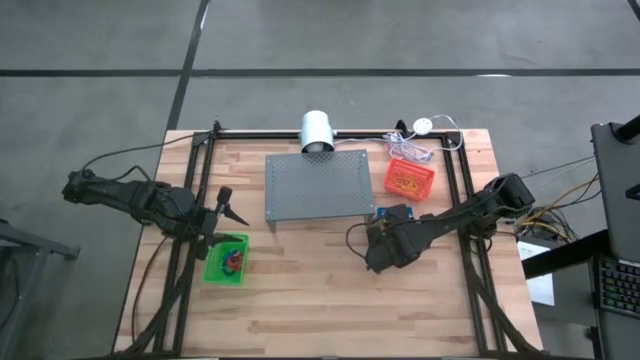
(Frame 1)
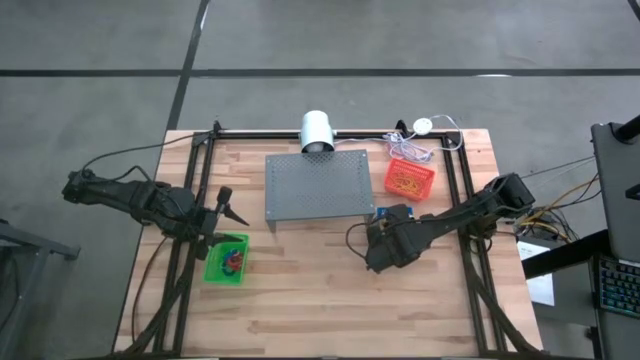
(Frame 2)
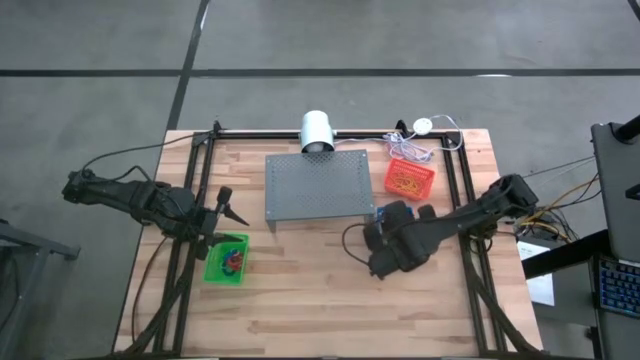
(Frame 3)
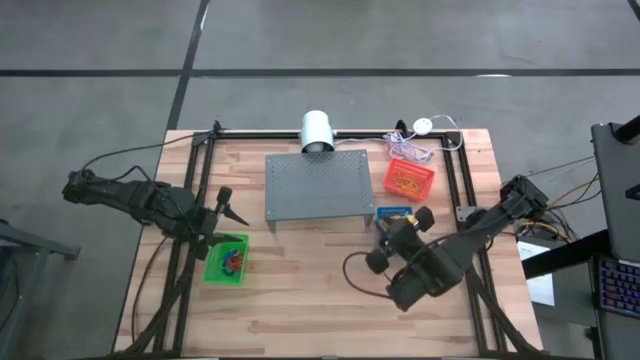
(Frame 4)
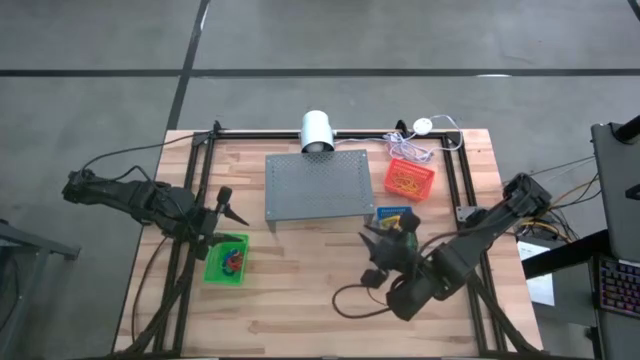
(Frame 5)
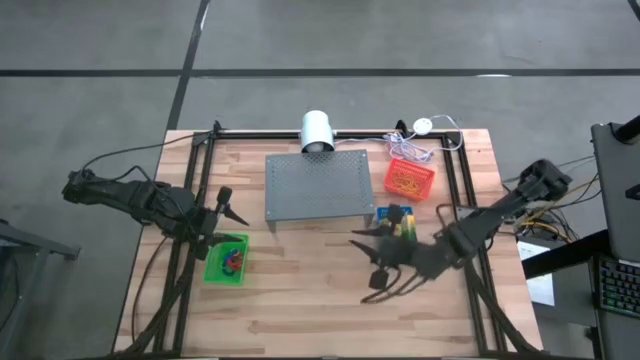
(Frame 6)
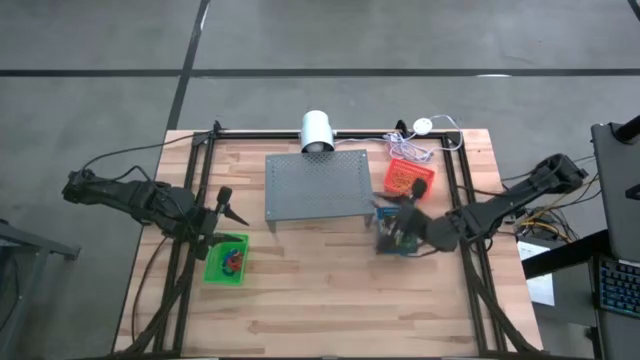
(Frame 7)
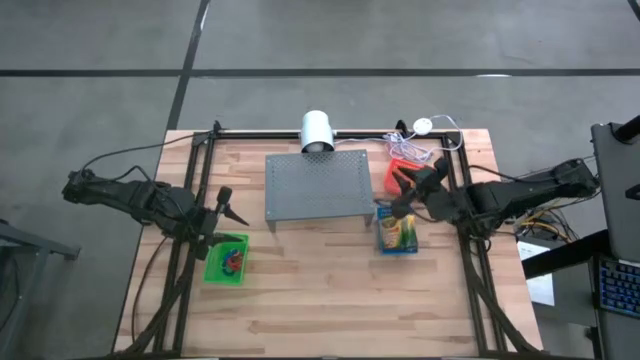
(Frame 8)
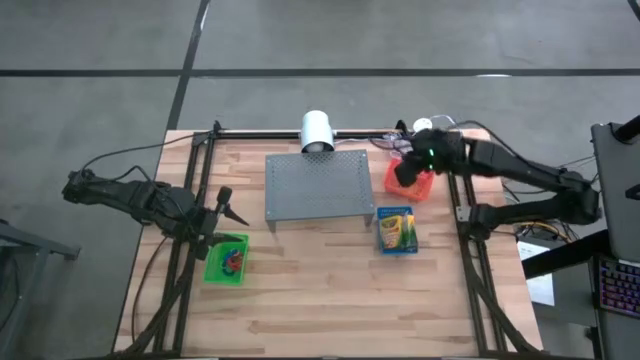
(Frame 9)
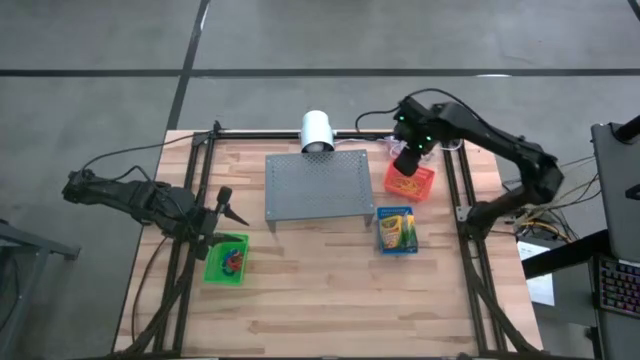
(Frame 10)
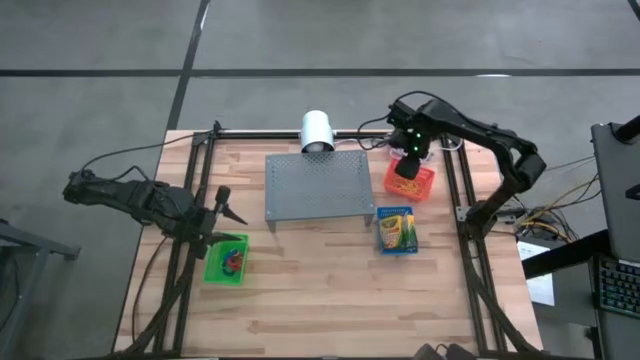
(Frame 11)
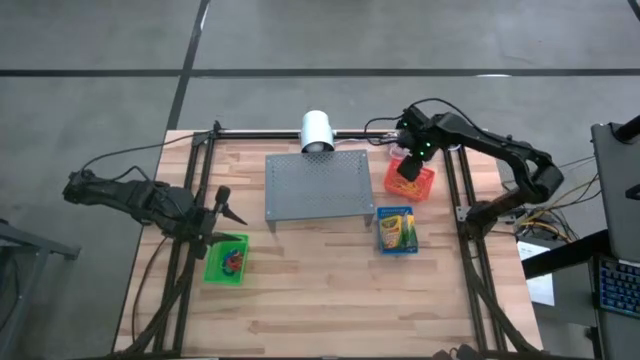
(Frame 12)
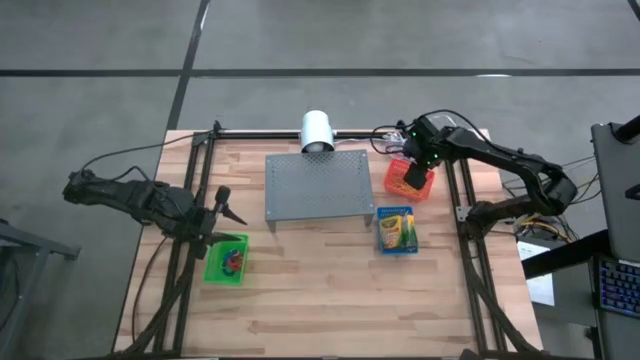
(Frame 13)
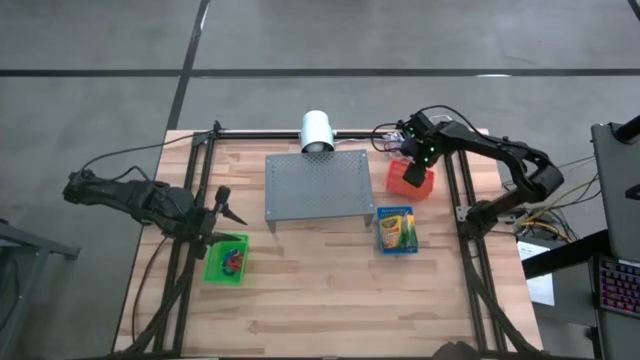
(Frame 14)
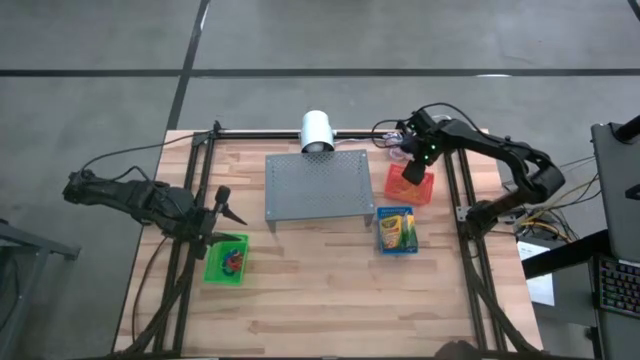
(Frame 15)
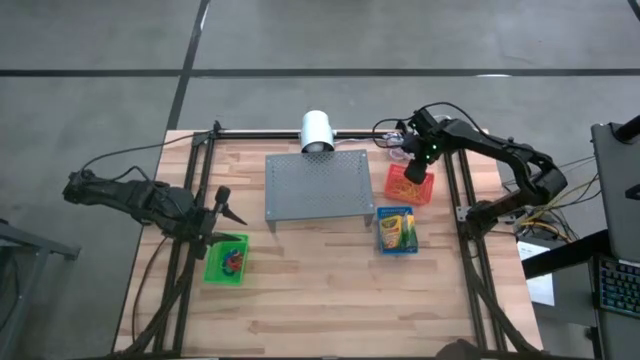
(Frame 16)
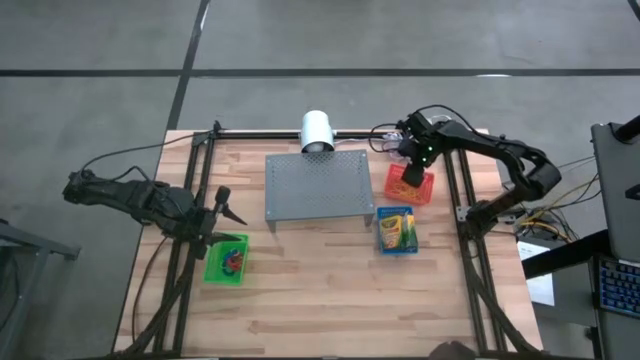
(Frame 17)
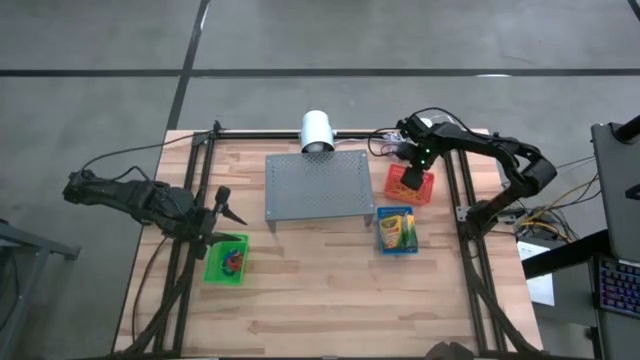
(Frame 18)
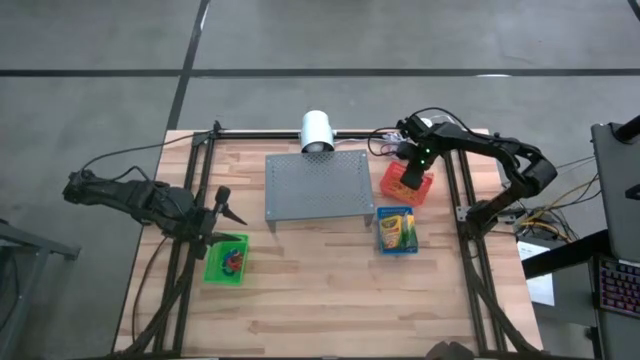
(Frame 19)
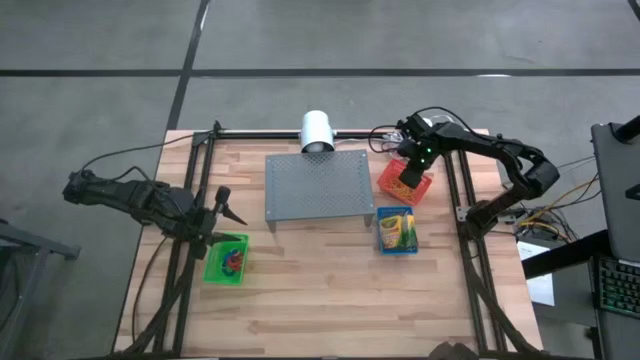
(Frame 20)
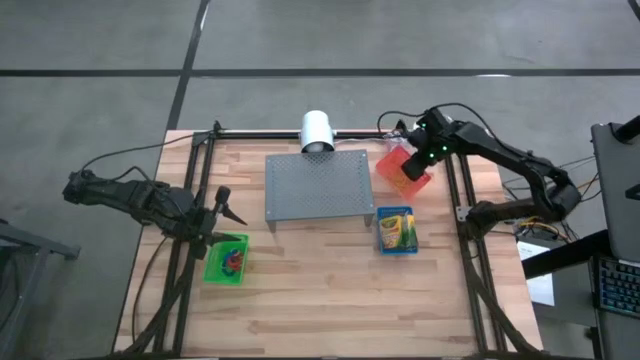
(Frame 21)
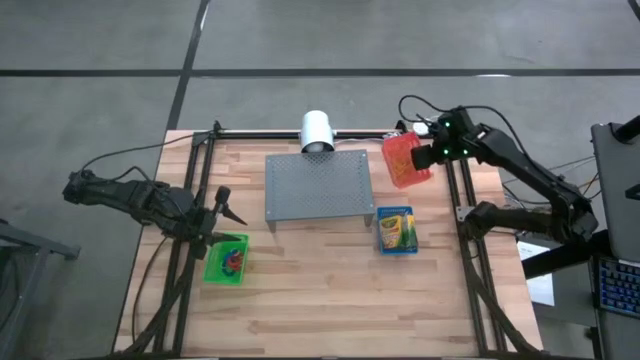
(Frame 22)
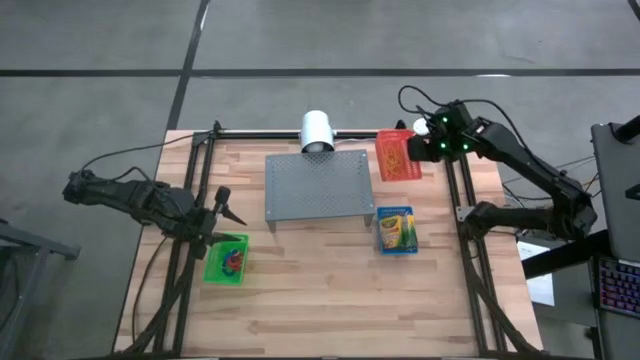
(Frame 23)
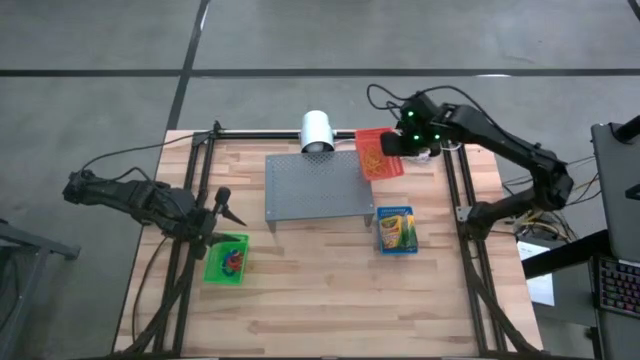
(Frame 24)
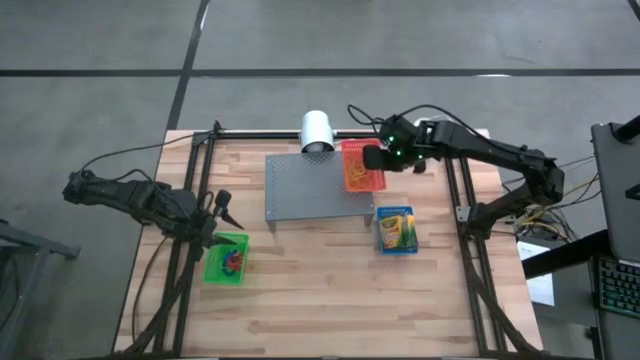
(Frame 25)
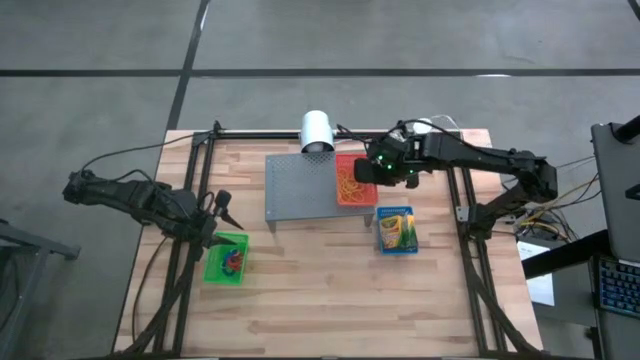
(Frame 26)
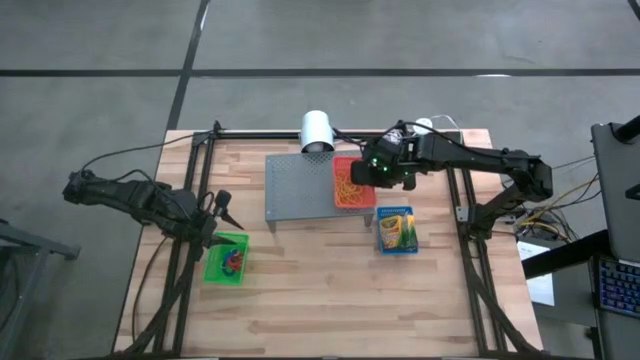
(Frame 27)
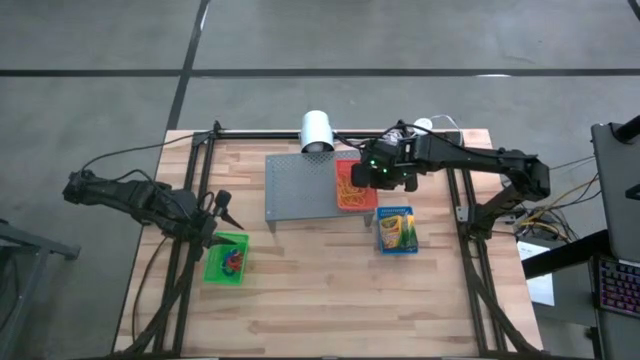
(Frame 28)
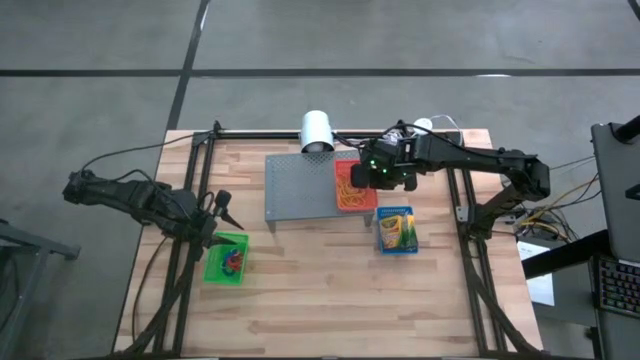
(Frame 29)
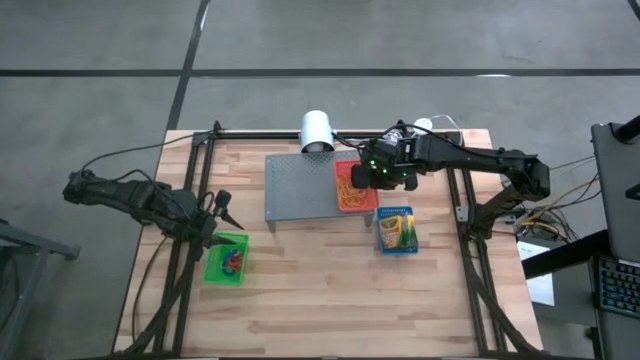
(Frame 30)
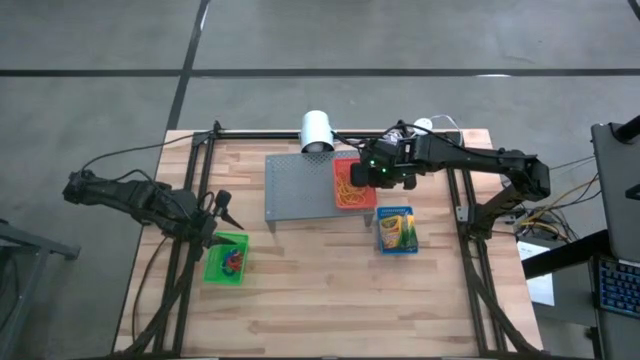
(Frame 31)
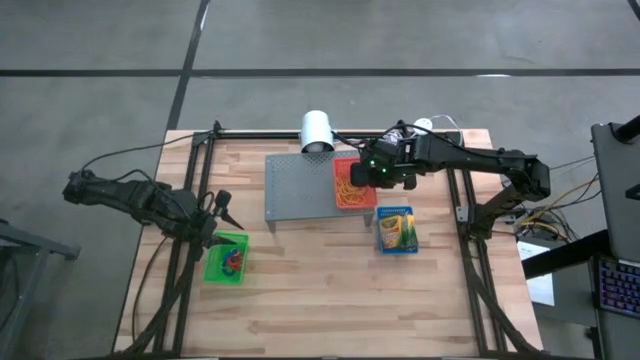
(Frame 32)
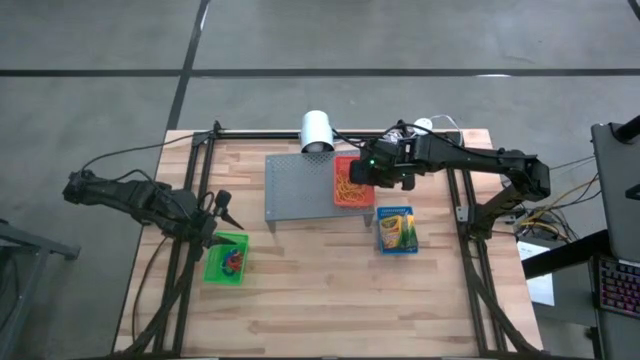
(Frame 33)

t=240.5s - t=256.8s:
Task: Pick & Place Office Desk Supplies
Put the yellow rubber band into the orange bin on the shelf

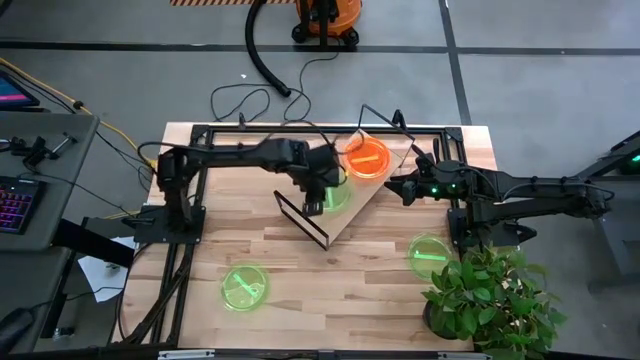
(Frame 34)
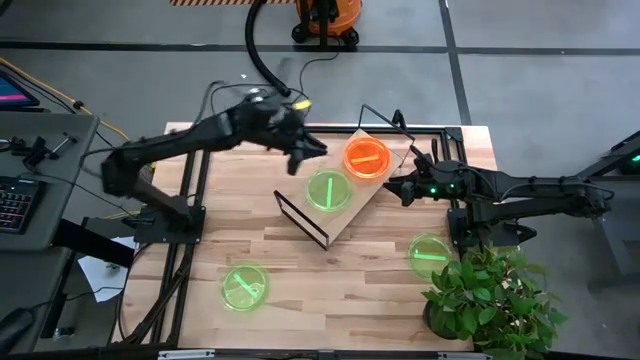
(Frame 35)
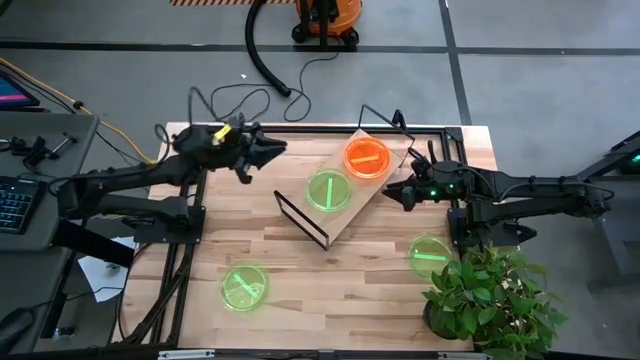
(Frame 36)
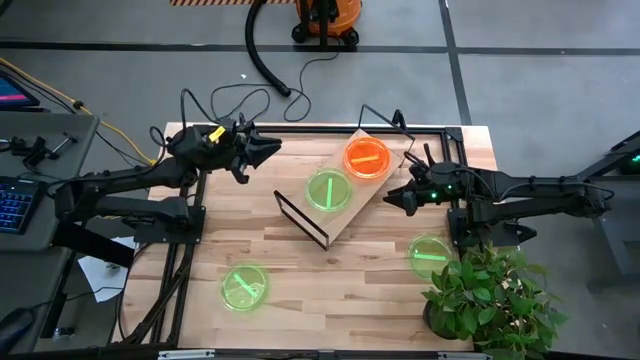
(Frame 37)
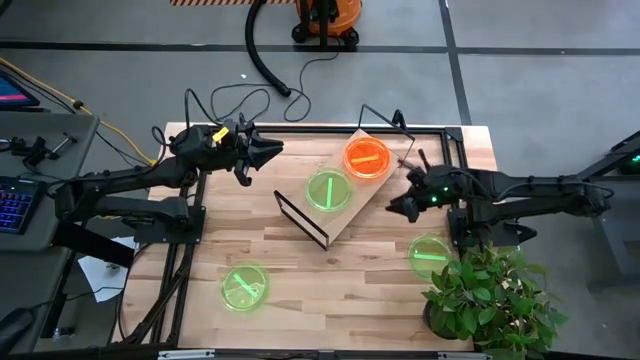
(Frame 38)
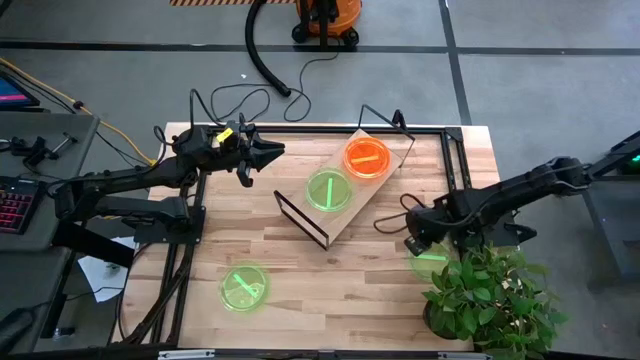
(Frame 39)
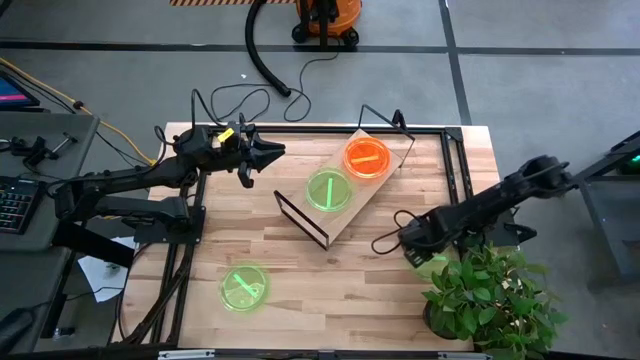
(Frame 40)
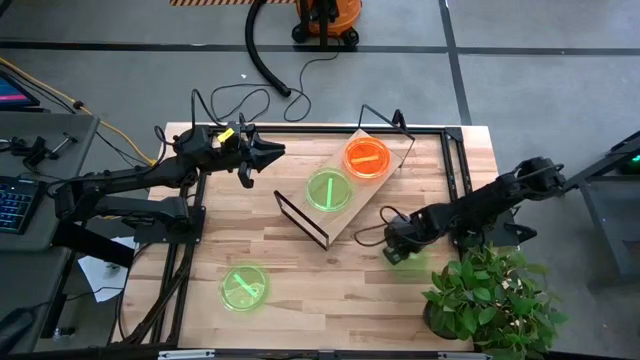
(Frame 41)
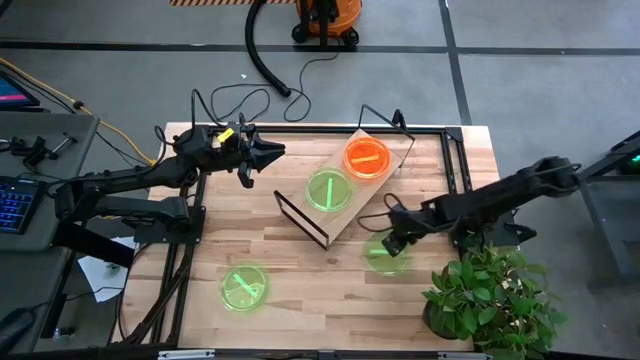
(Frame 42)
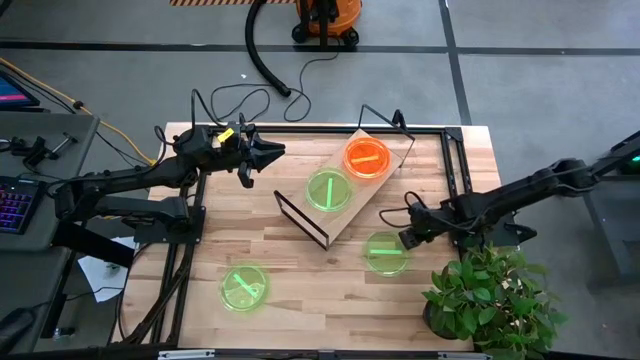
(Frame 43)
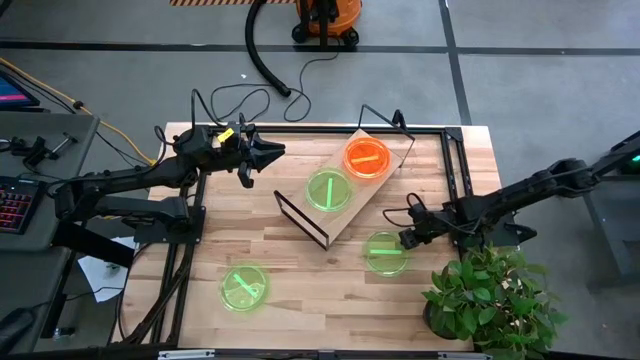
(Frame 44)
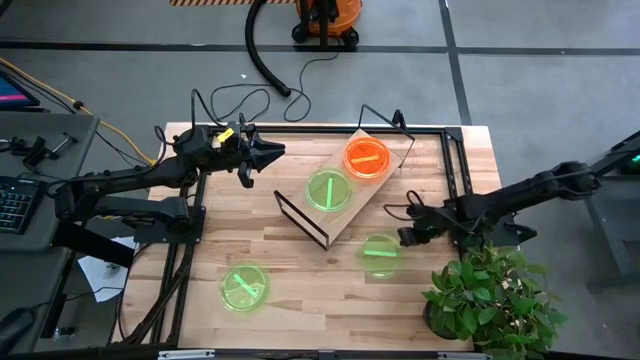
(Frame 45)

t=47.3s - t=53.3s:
Task: Place and stack plates onto a shelf
Stack the right green plate on top of the green plate on the shelf
